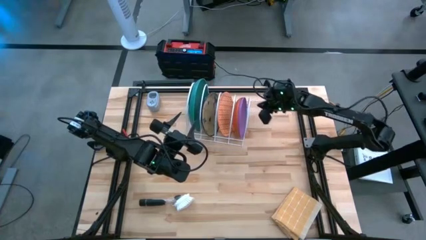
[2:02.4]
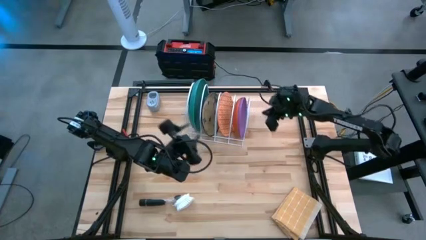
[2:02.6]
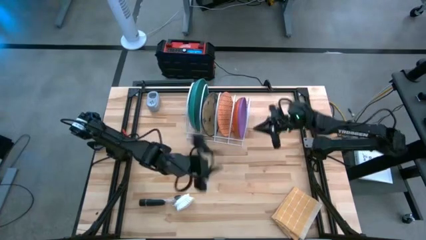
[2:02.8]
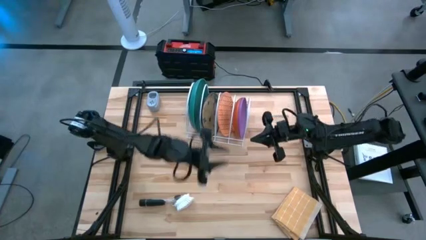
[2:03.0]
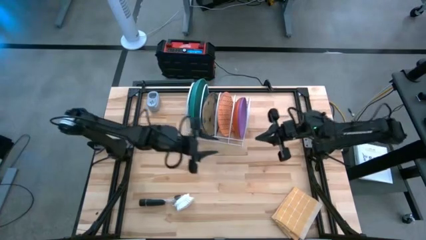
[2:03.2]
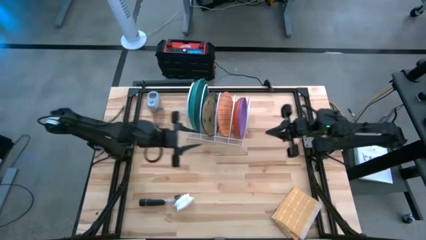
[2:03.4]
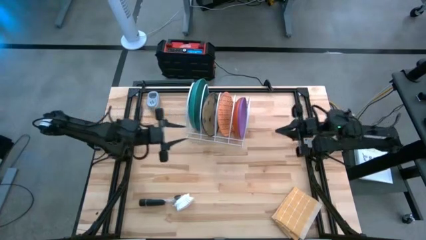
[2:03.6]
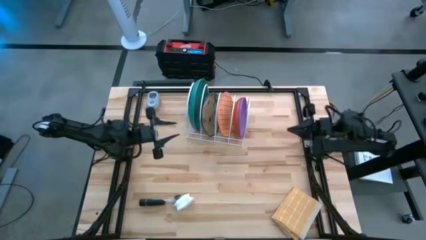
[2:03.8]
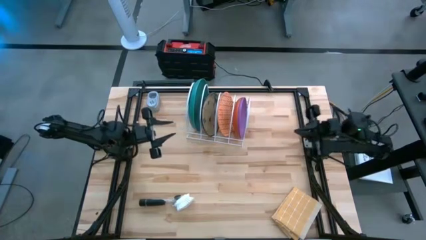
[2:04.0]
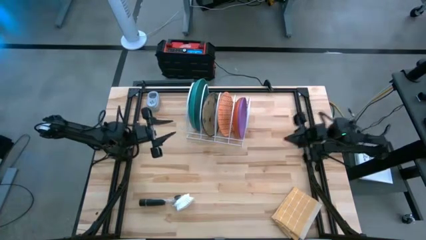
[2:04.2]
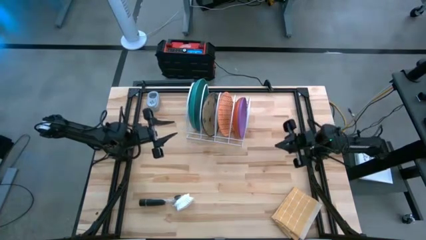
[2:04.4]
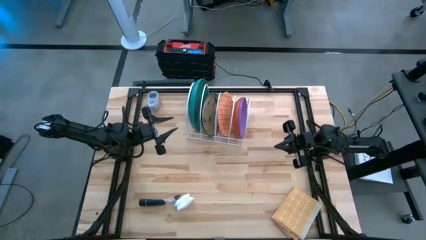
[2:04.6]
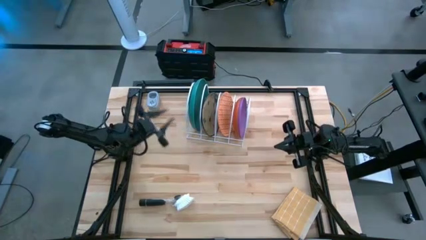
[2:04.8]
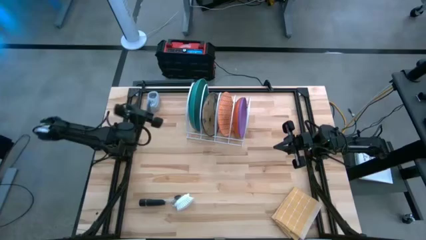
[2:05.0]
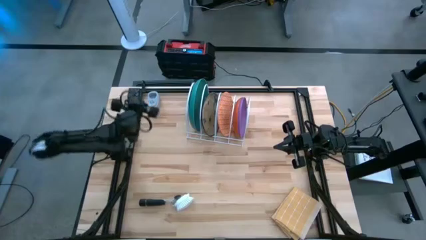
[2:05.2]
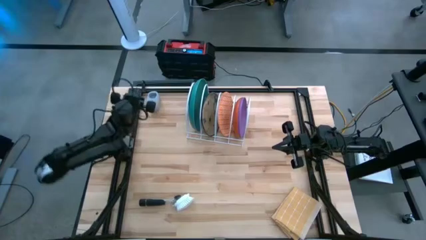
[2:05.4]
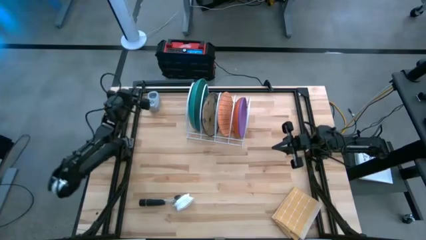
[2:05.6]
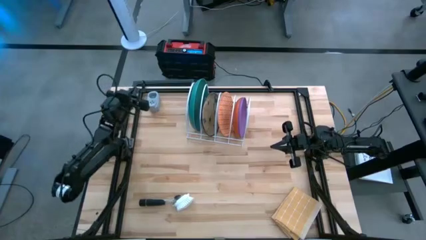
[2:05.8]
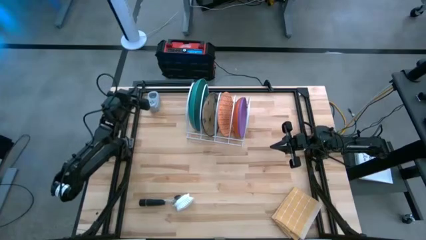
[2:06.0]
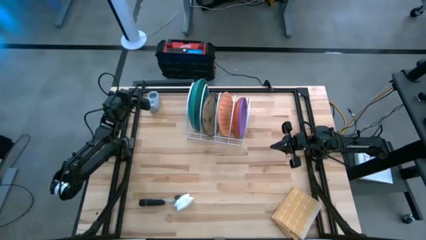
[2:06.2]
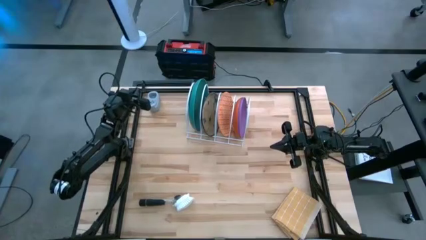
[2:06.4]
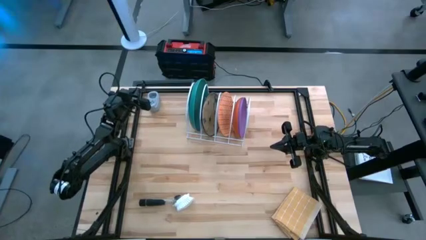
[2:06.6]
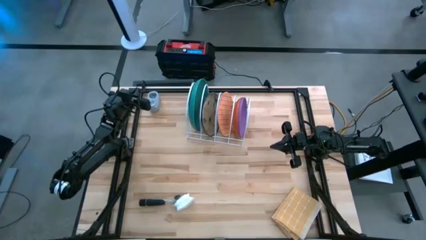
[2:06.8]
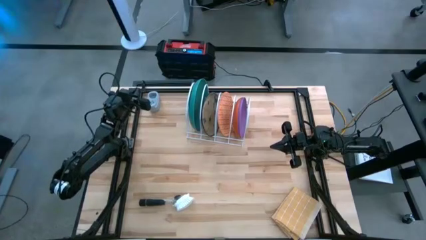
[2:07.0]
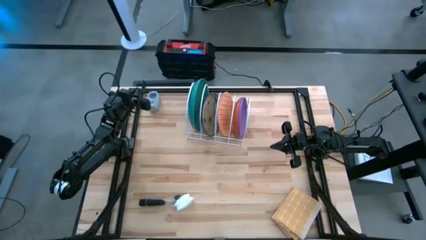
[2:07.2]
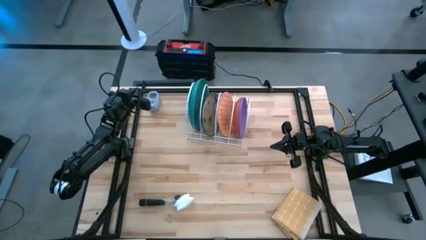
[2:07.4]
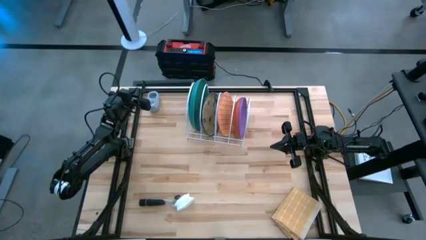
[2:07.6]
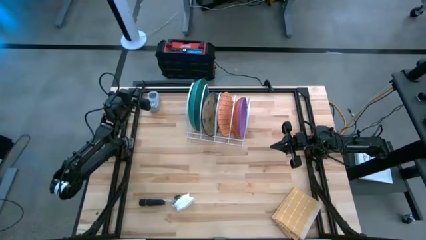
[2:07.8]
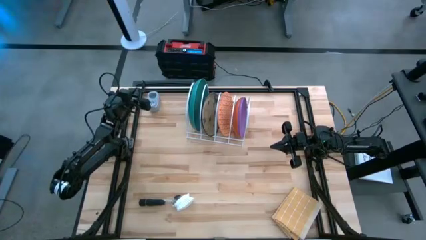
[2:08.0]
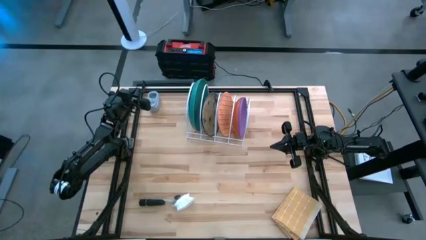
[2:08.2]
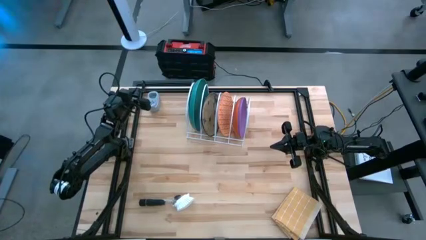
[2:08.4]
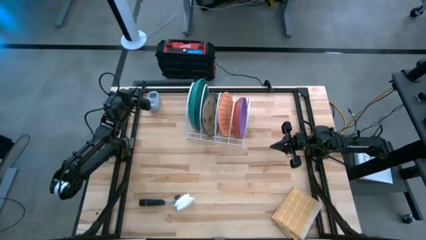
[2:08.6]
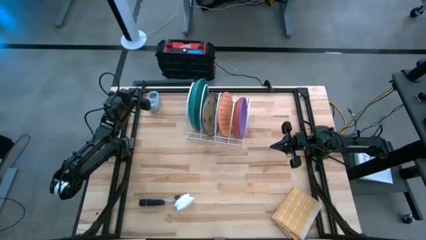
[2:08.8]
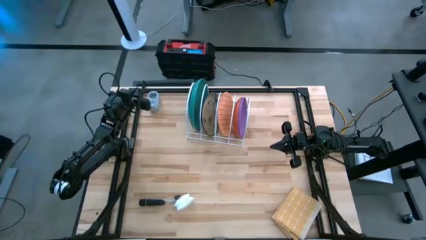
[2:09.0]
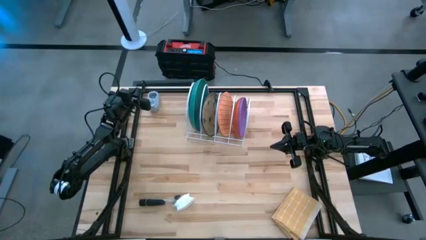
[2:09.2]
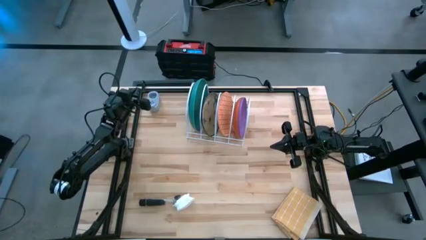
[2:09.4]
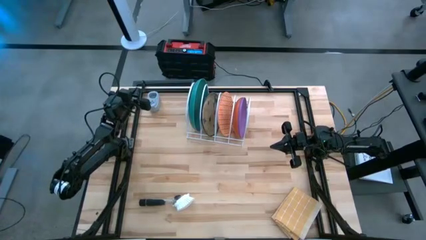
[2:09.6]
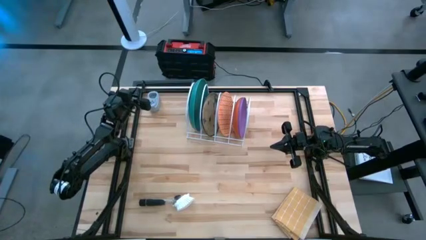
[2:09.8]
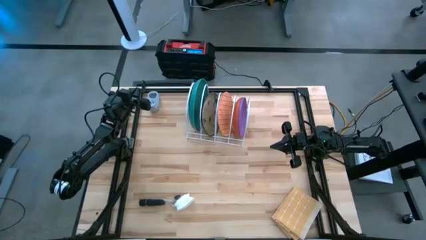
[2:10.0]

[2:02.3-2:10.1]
Task: Sort dishes
Return to Home Position

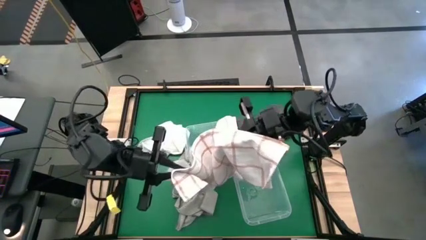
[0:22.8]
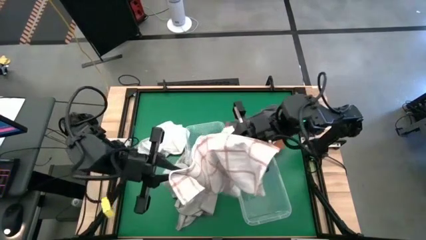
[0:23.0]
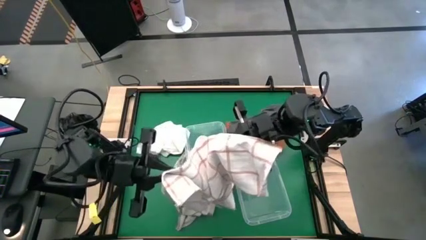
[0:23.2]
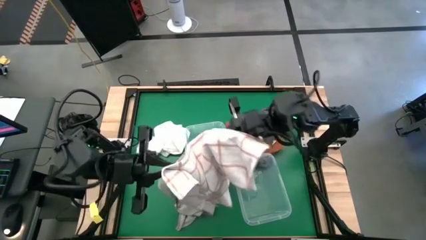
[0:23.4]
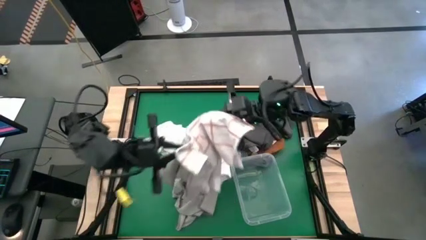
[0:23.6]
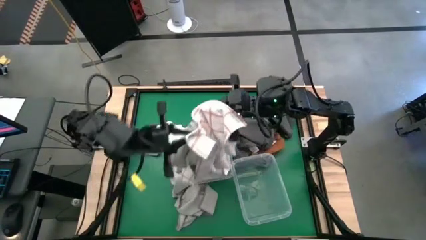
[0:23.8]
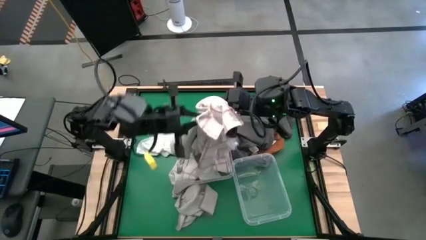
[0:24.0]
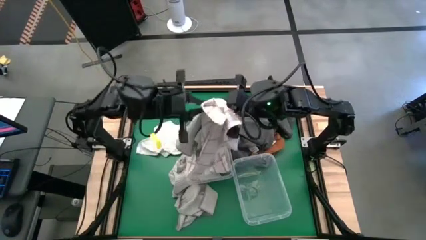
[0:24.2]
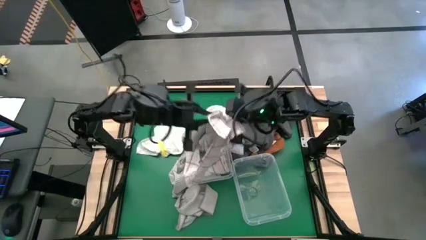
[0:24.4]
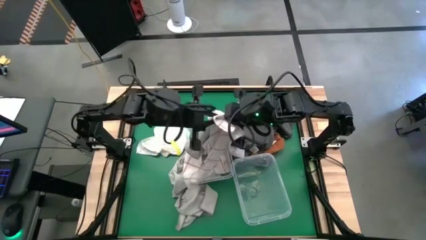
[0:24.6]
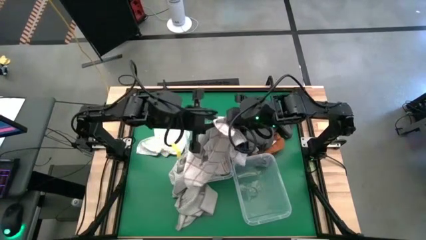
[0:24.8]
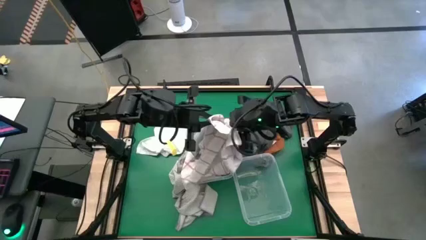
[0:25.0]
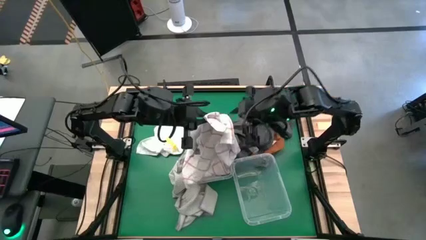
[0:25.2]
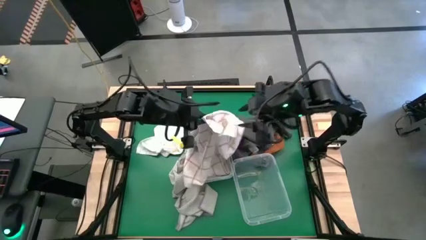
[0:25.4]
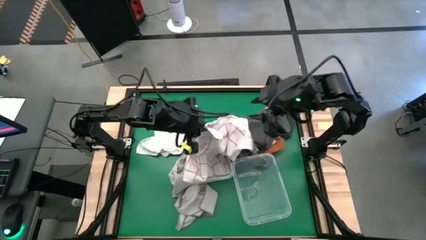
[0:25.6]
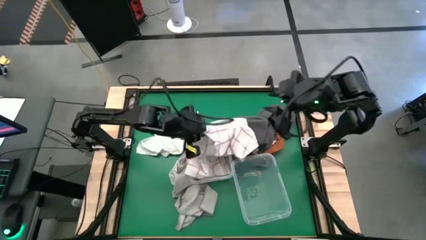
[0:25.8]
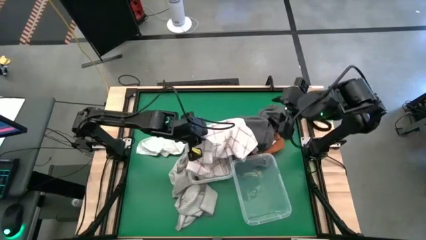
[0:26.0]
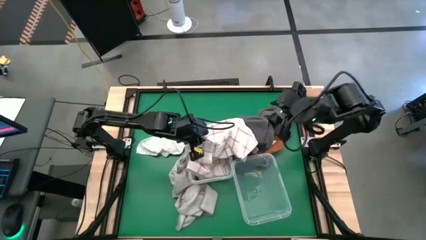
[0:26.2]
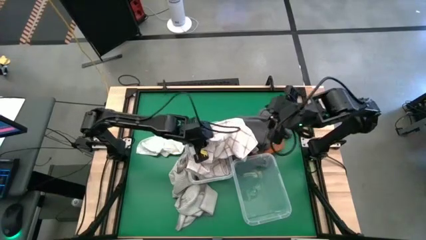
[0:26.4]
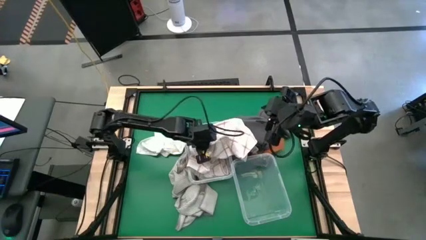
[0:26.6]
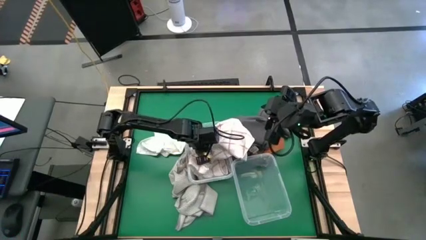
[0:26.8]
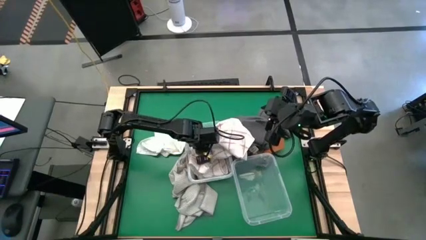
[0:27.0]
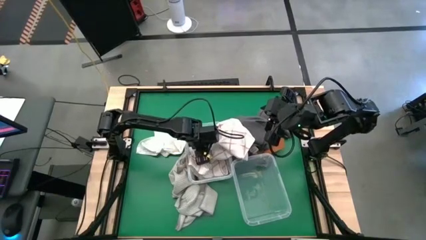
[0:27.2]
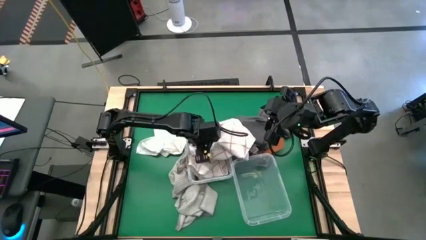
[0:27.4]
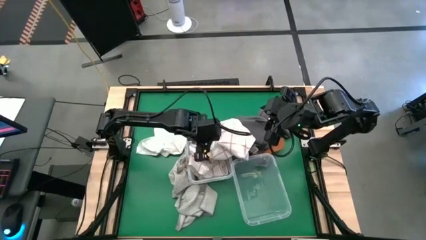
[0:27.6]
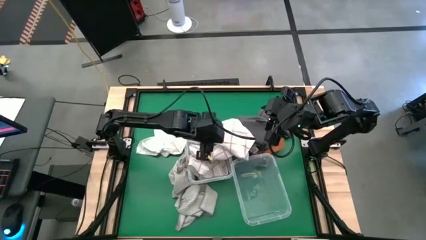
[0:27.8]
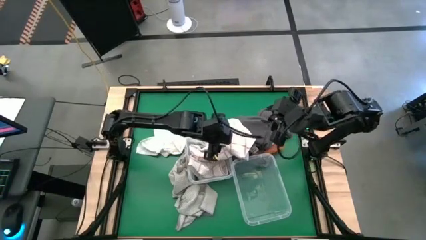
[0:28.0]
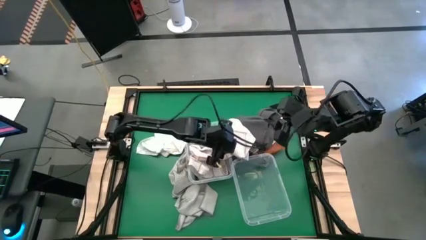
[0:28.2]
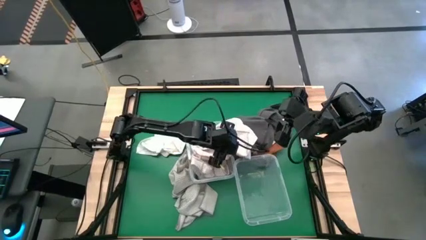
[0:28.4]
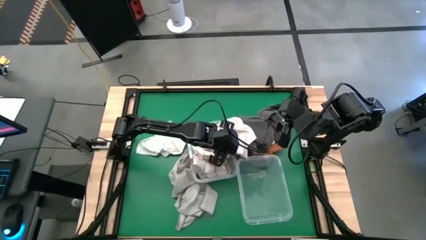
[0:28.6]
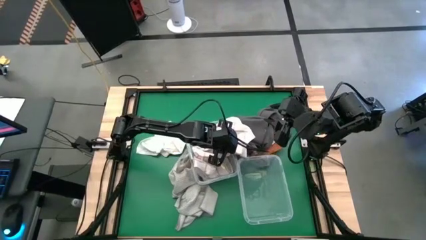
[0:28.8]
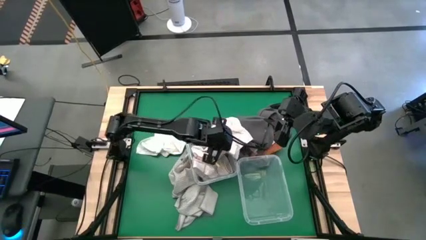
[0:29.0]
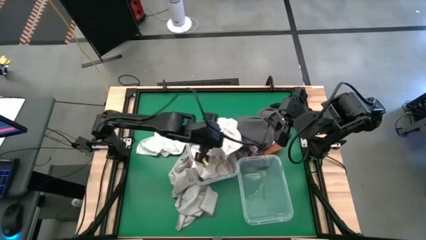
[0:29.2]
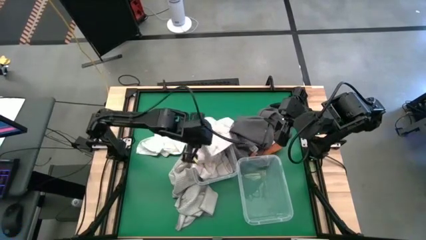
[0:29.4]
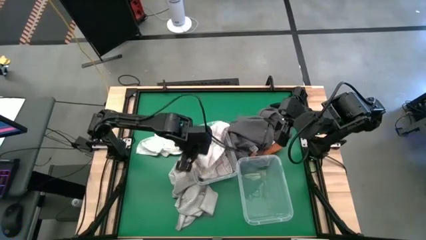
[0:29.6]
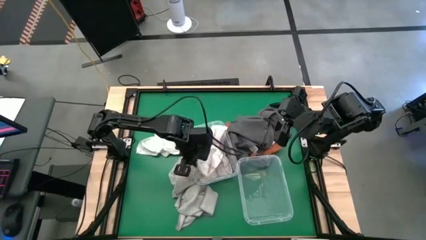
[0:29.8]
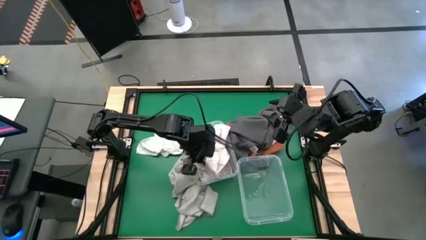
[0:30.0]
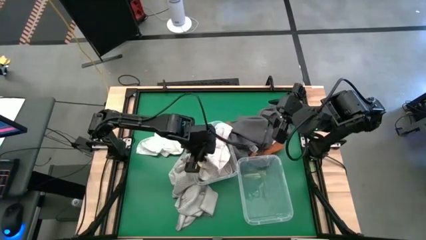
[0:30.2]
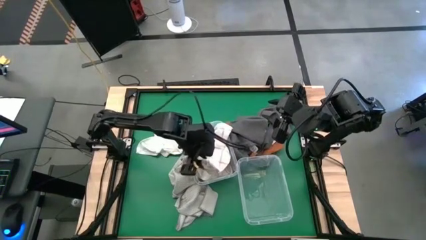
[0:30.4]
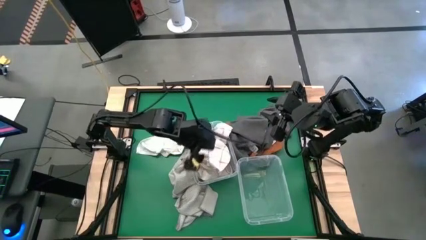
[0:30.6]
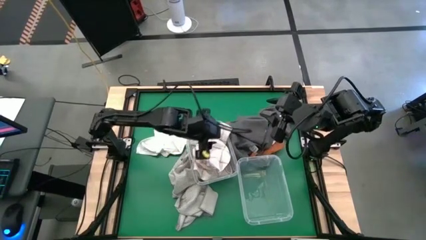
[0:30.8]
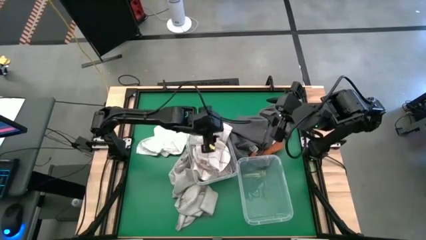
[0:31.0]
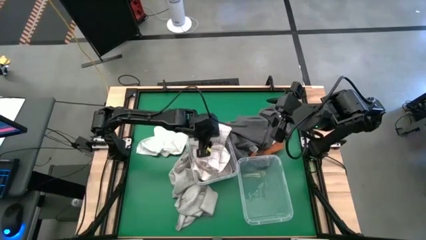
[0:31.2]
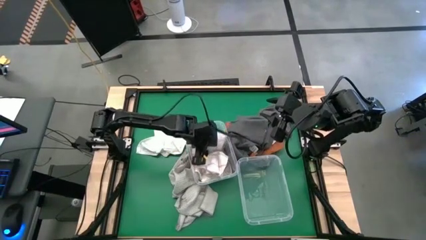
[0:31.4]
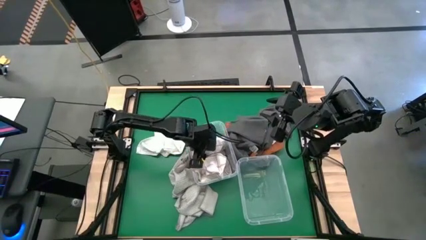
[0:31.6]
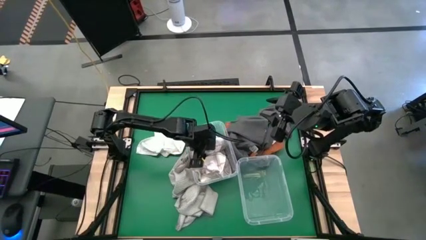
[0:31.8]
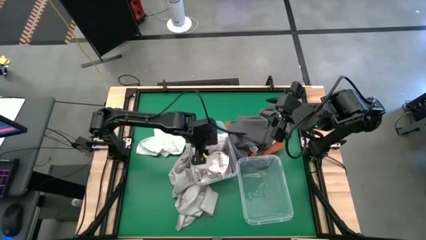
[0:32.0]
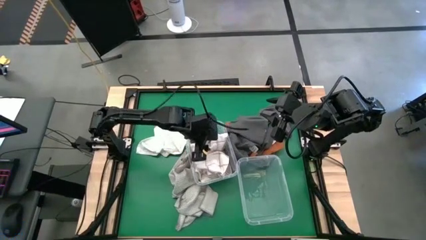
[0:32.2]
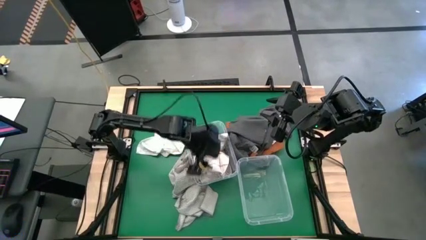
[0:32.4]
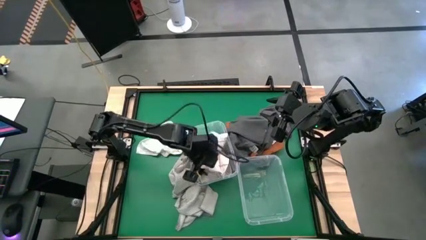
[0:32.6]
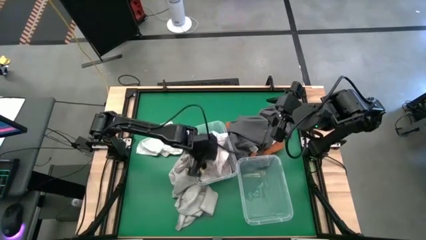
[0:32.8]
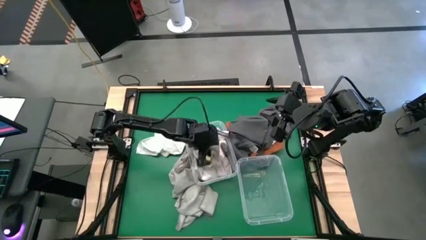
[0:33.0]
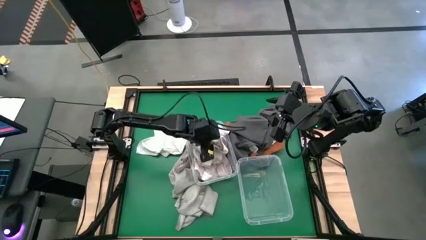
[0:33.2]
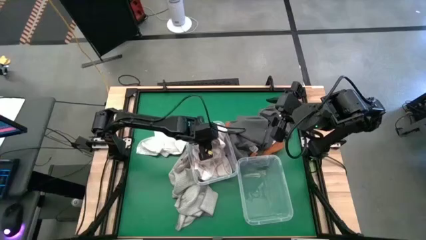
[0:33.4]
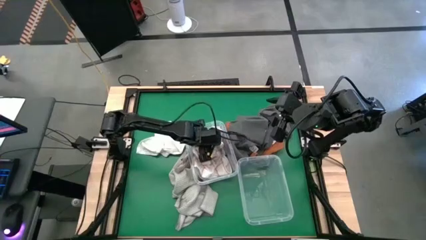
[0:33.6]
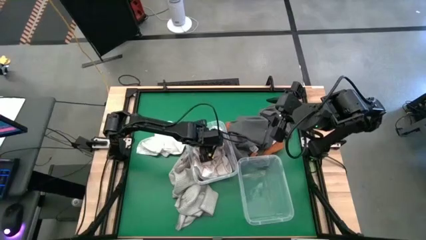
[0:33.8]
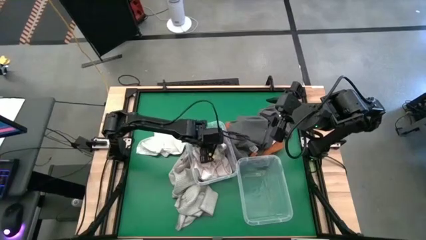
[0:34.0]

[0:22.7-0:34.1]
Task: Sort microfiber towel by color & place in baskets
Put the white patterned microfiber towel into the left transparent bin
